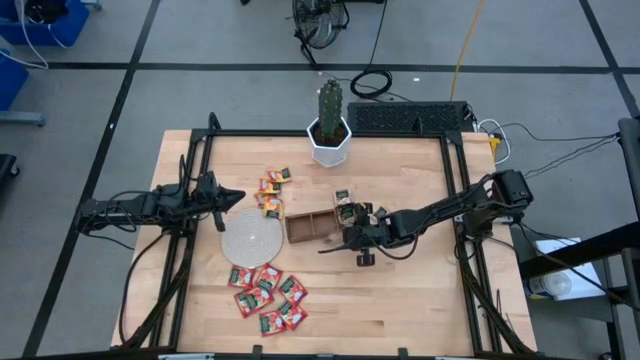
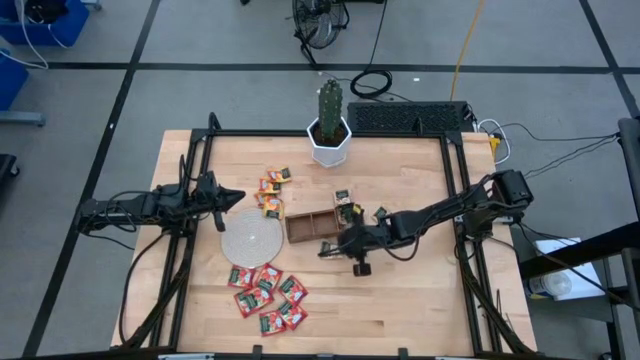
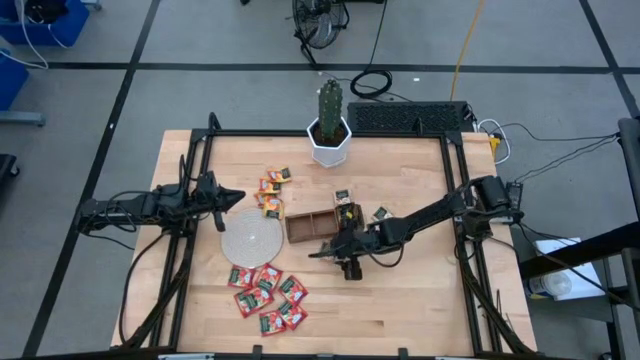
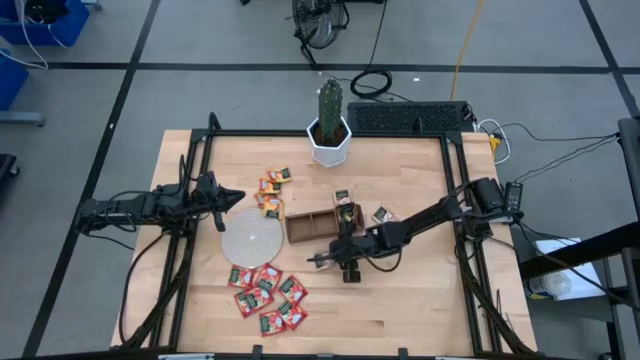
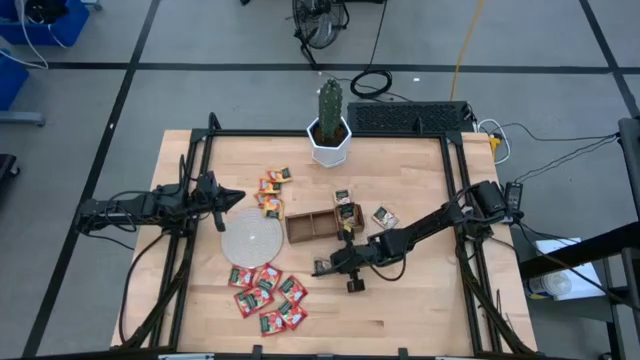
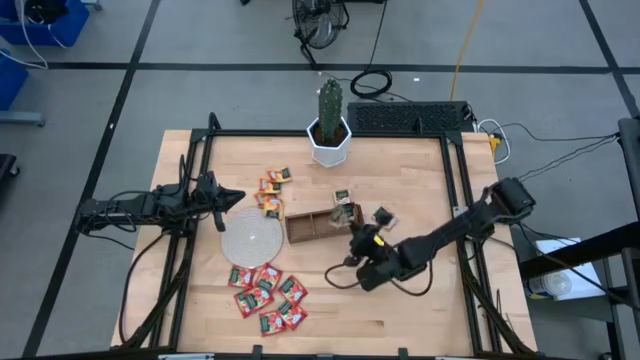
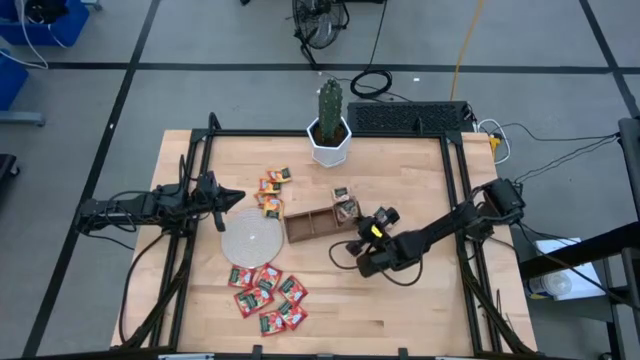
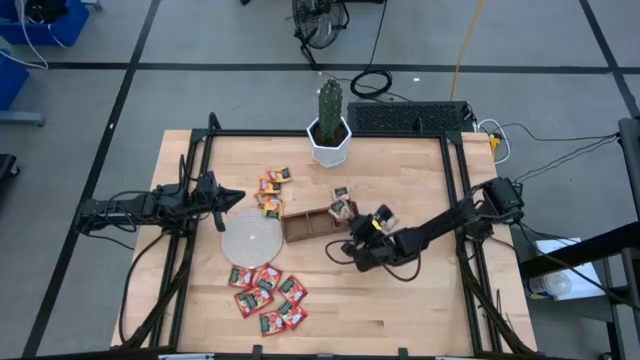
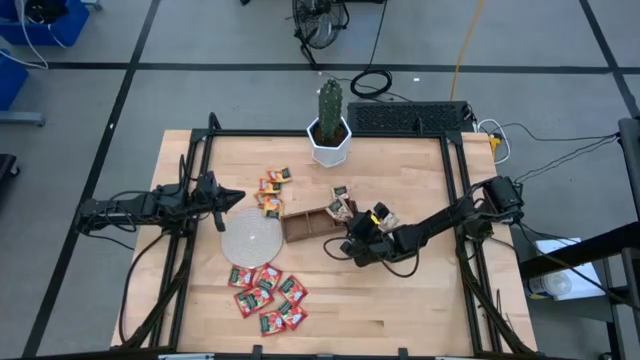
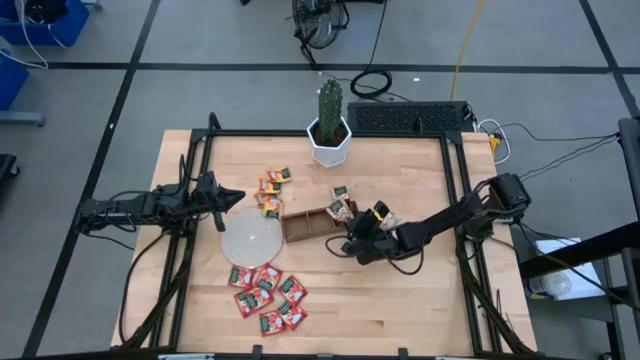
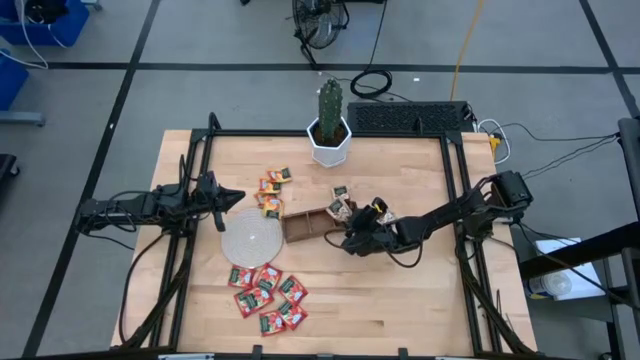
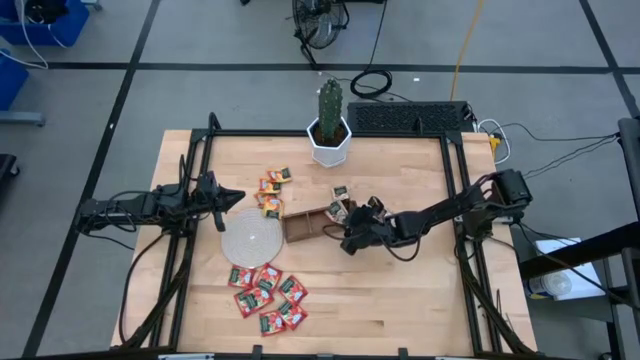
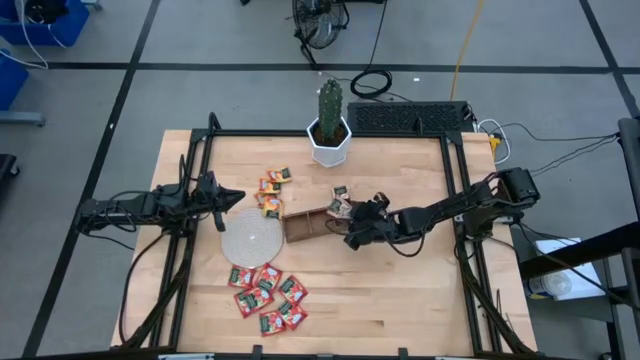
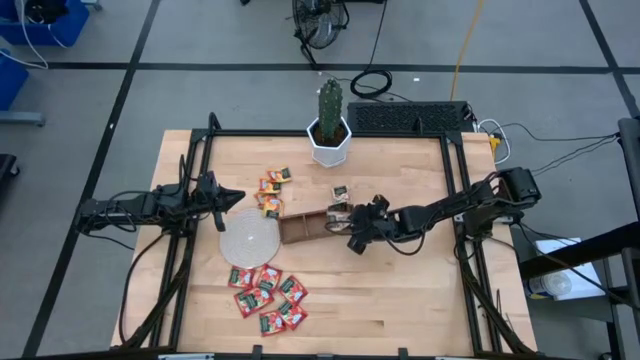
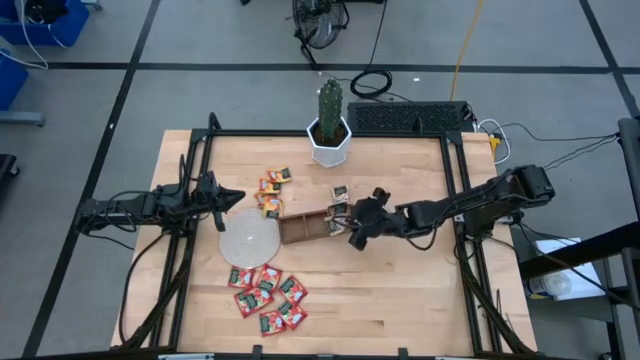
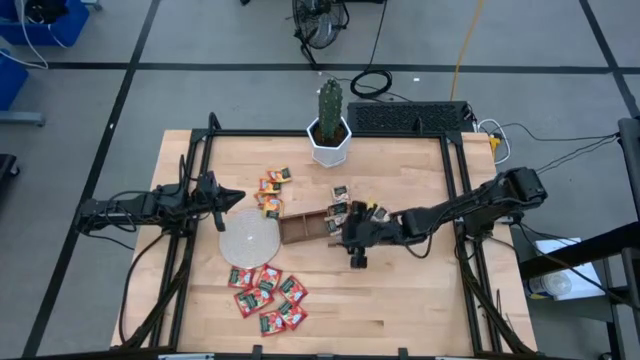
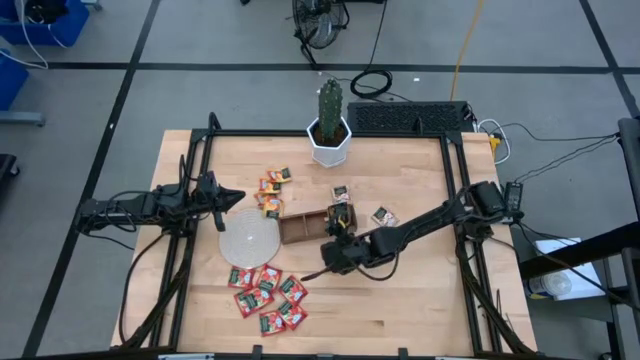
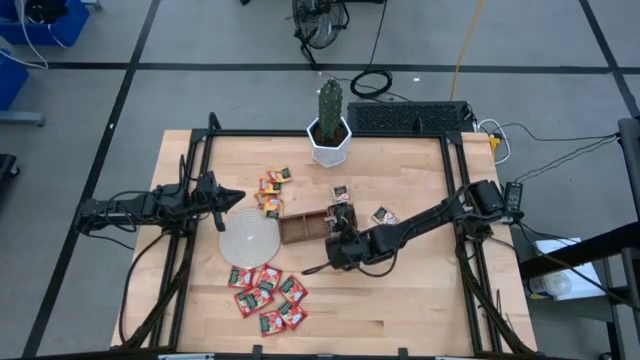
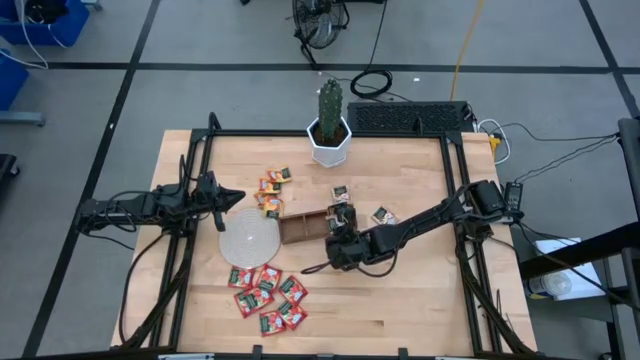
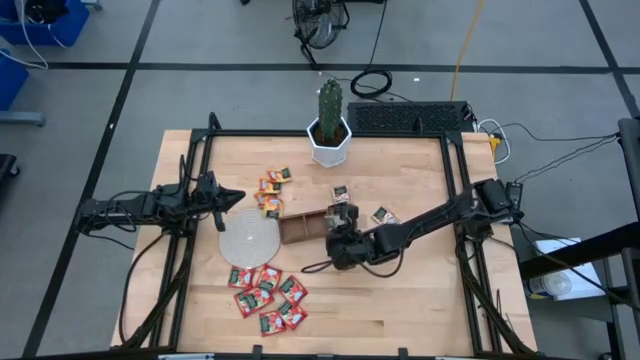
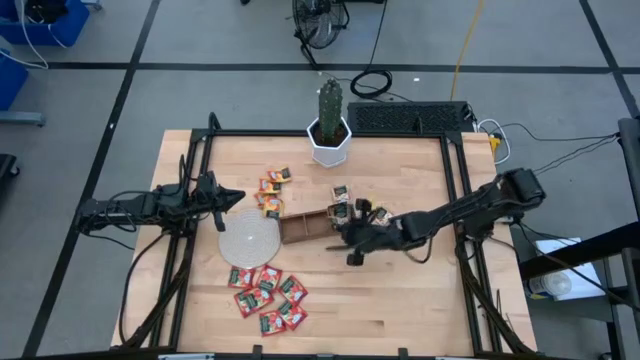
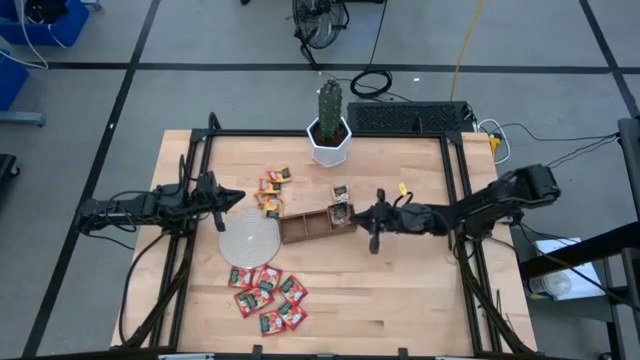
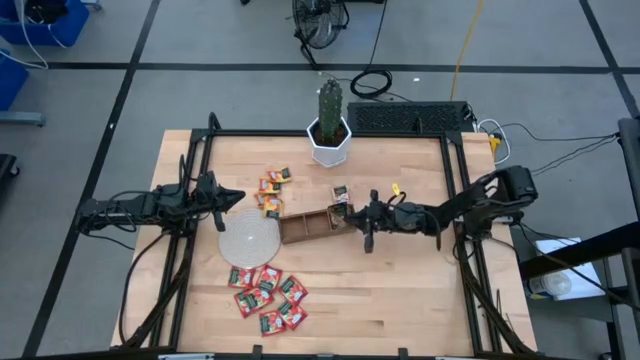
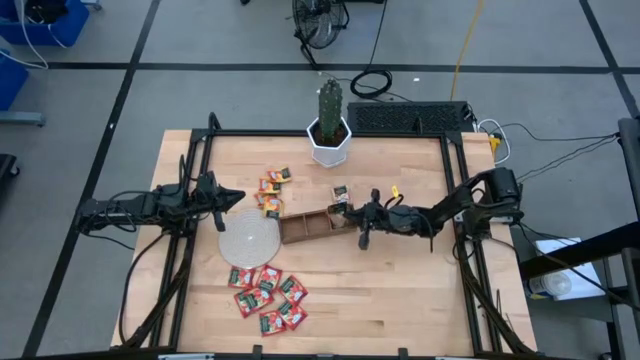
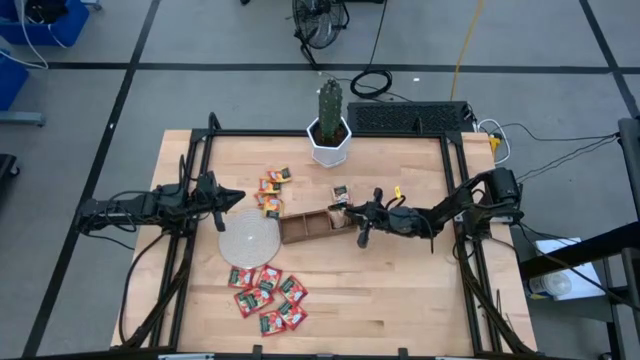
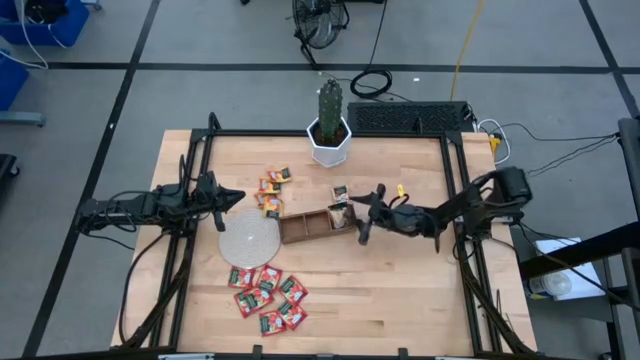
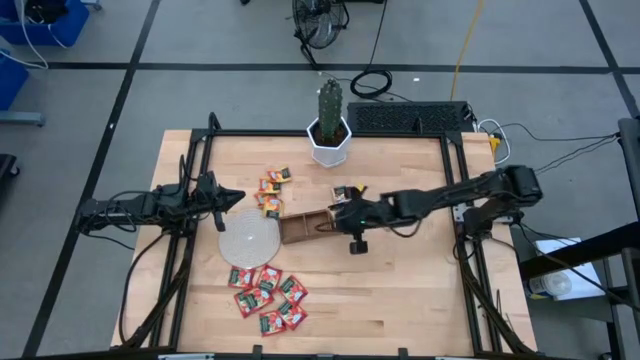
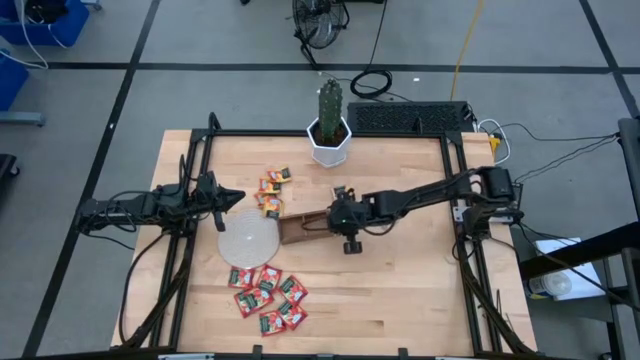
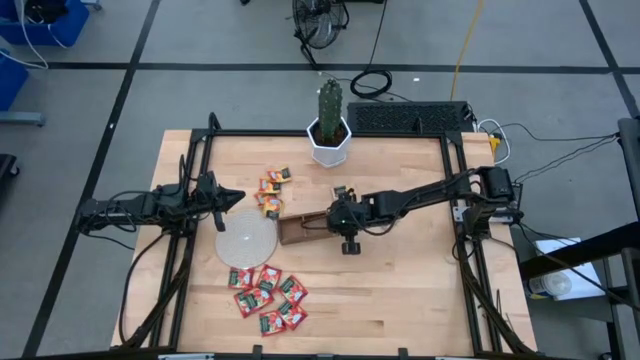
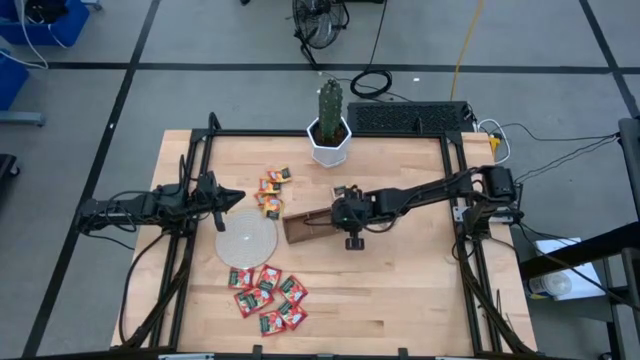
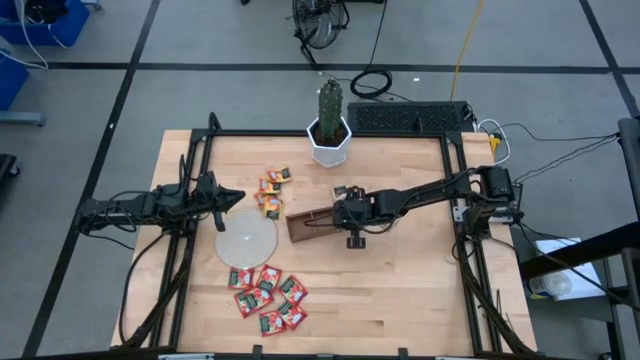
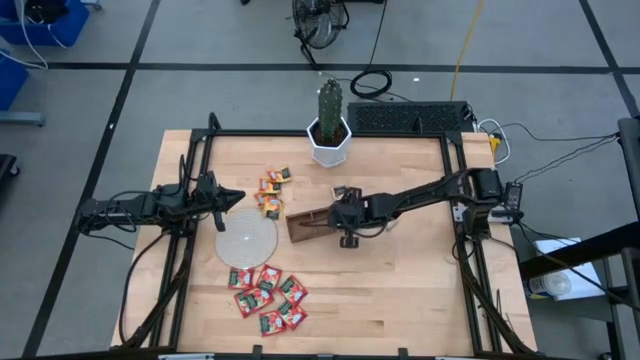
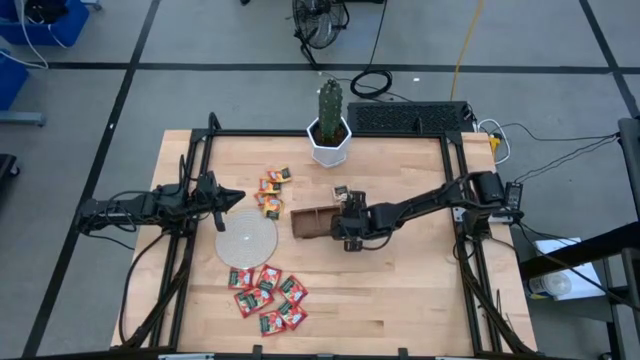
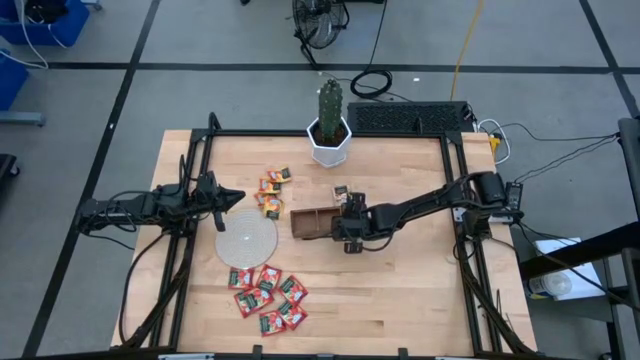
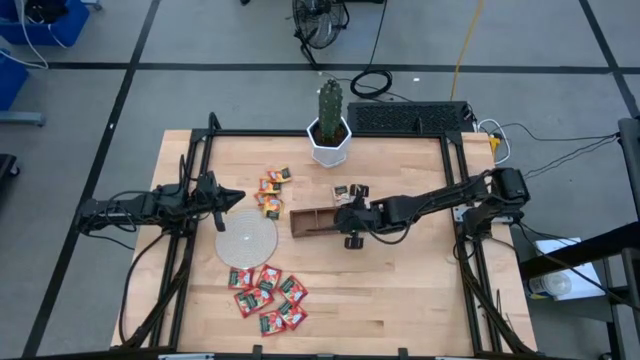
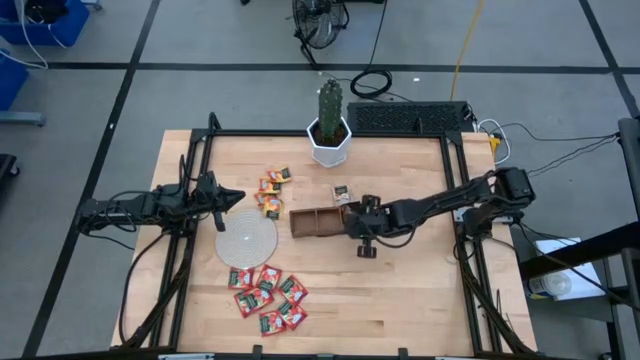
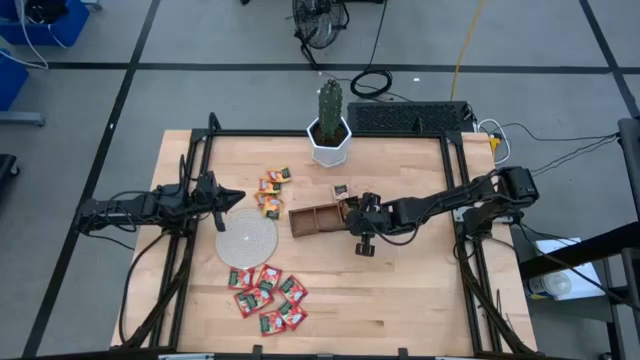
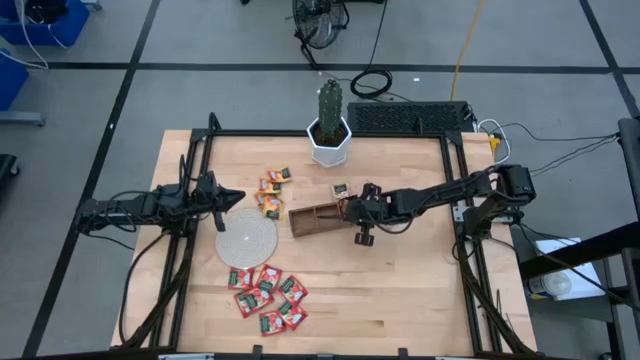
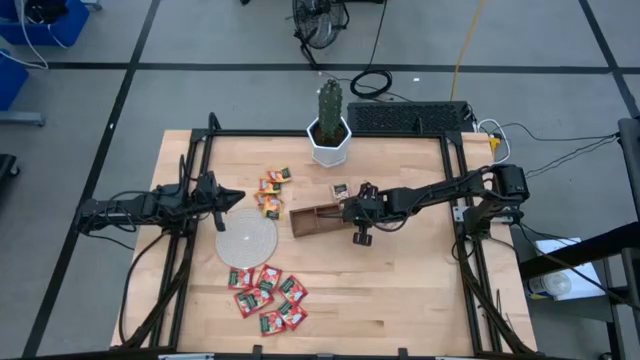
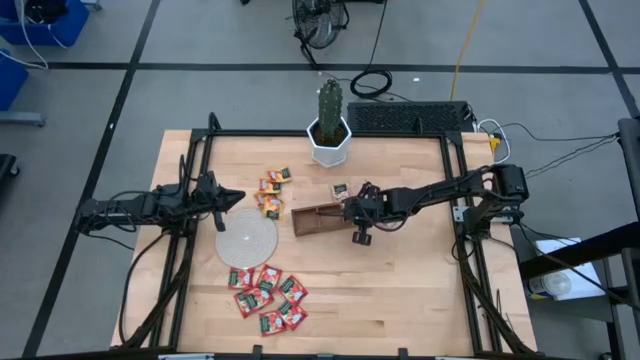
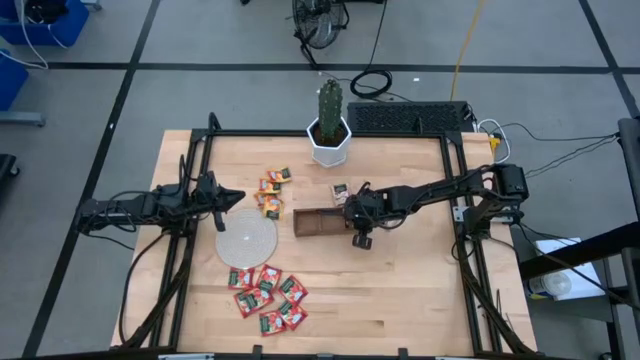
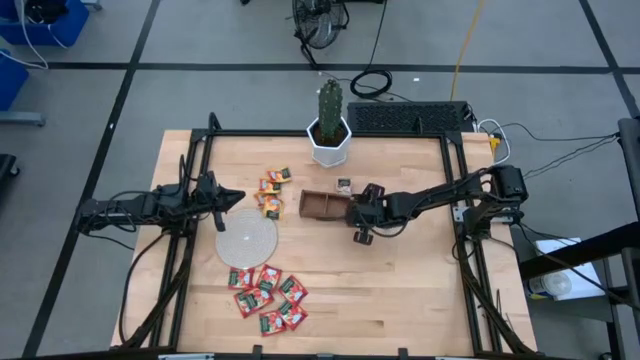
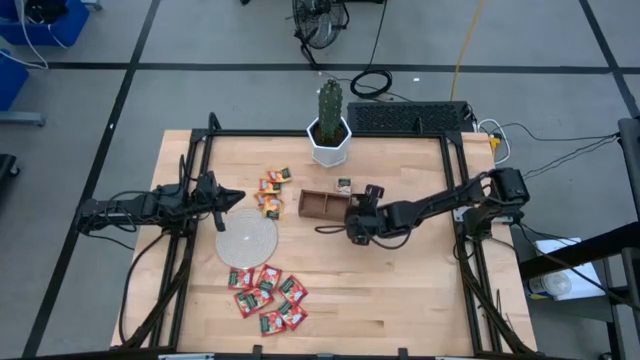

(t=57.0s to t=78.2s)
Task: Pick & Place Tea
Put the brown tea bag into the right section of the wooden organizer
